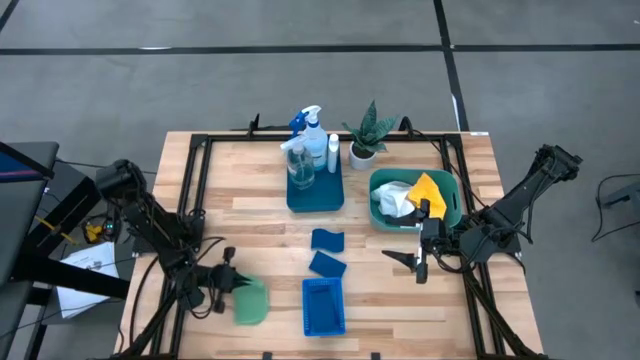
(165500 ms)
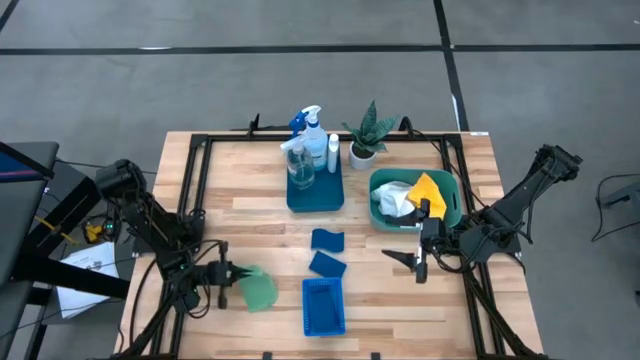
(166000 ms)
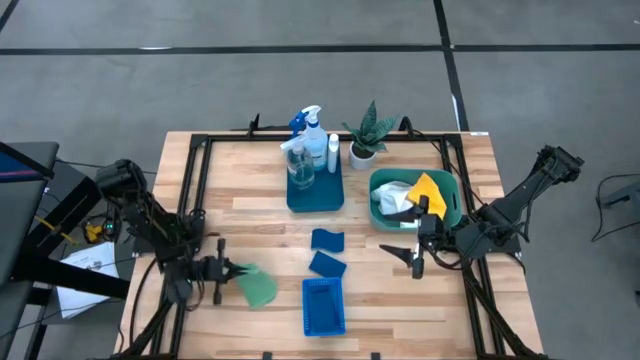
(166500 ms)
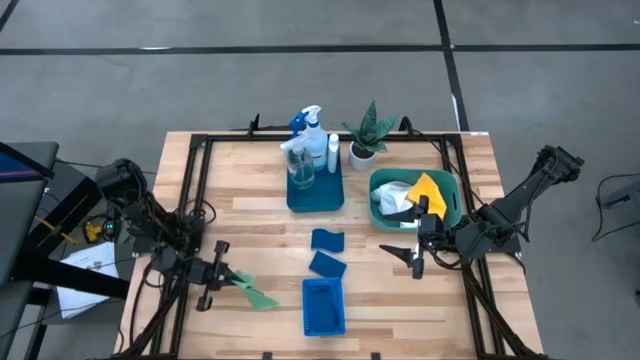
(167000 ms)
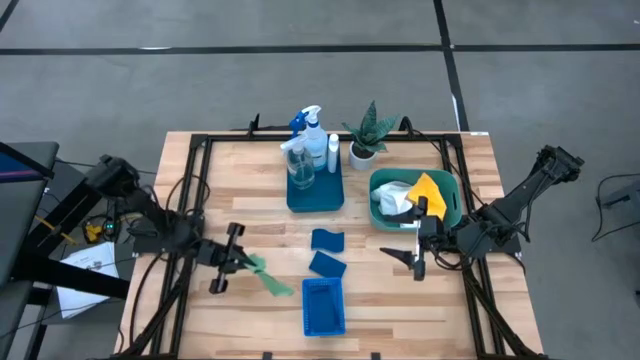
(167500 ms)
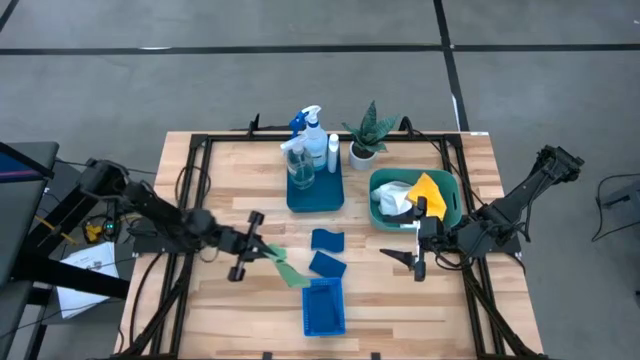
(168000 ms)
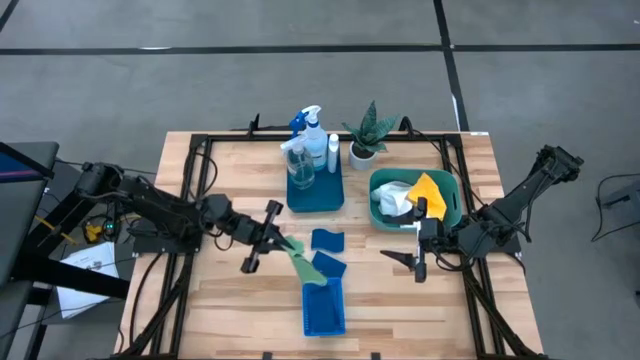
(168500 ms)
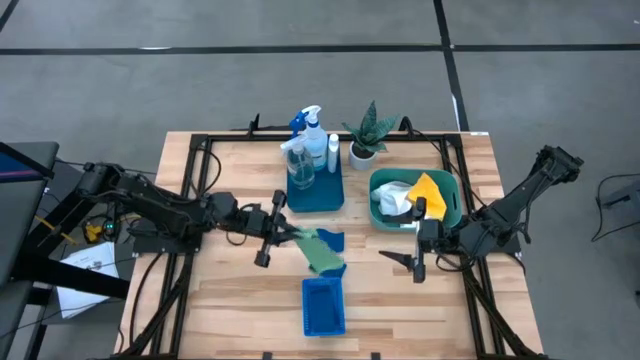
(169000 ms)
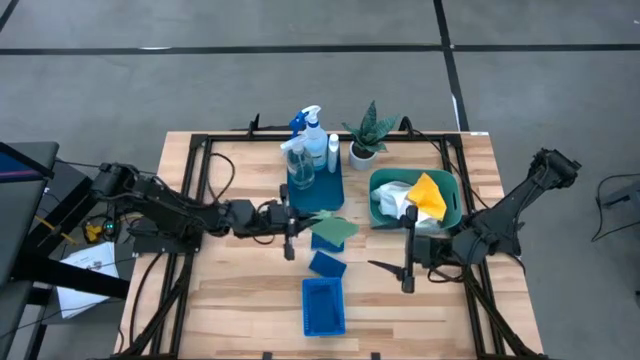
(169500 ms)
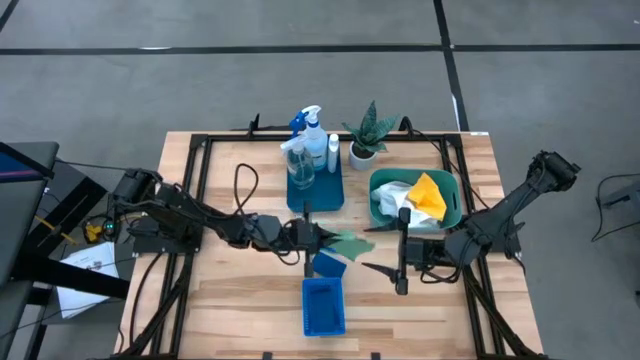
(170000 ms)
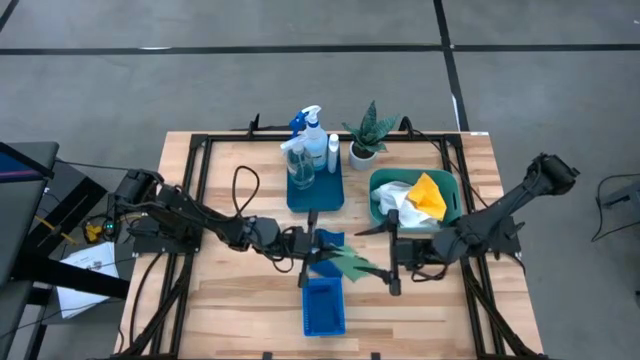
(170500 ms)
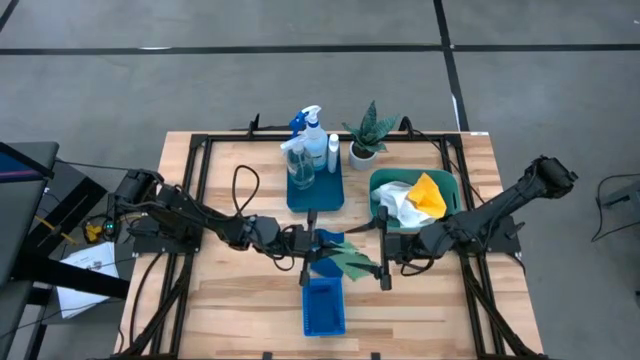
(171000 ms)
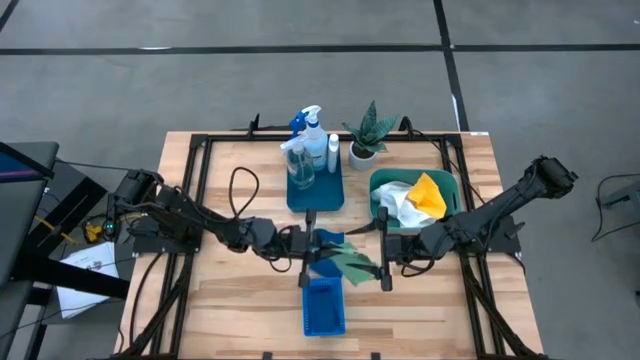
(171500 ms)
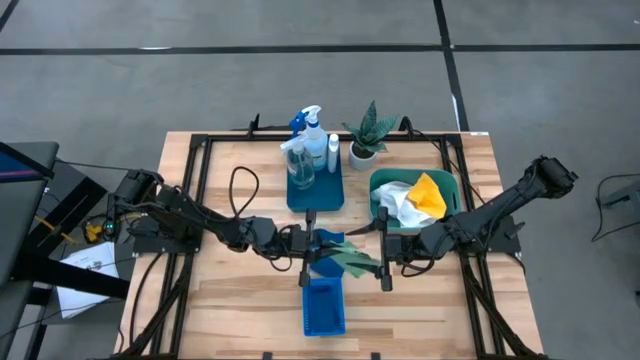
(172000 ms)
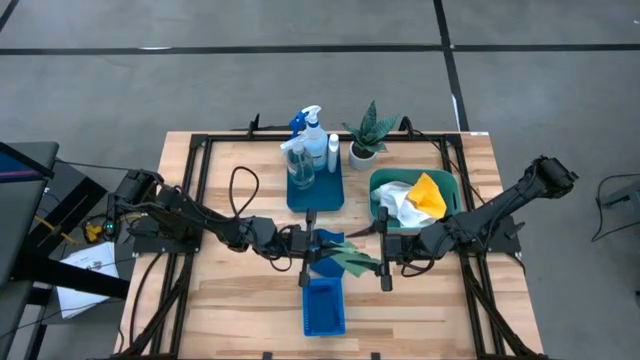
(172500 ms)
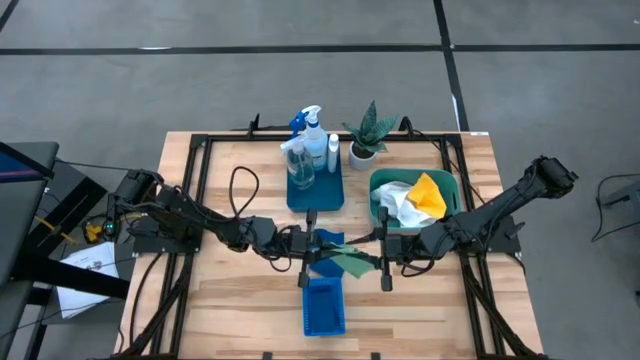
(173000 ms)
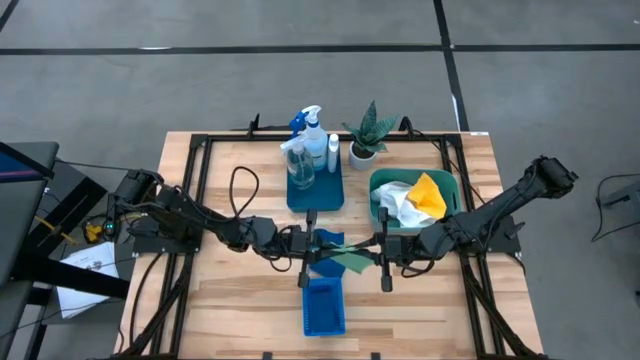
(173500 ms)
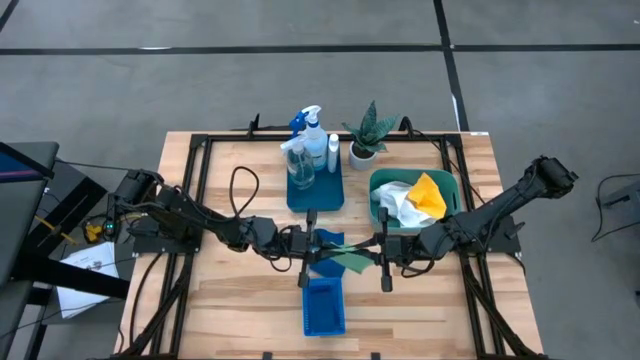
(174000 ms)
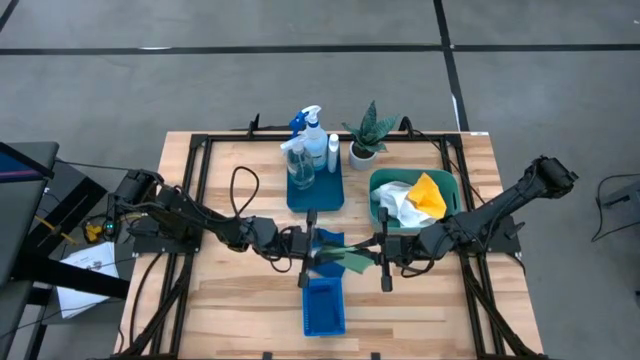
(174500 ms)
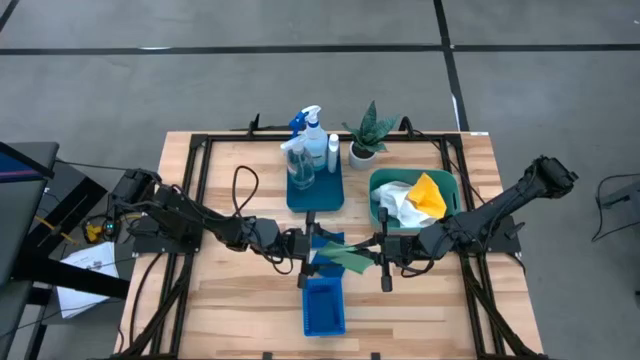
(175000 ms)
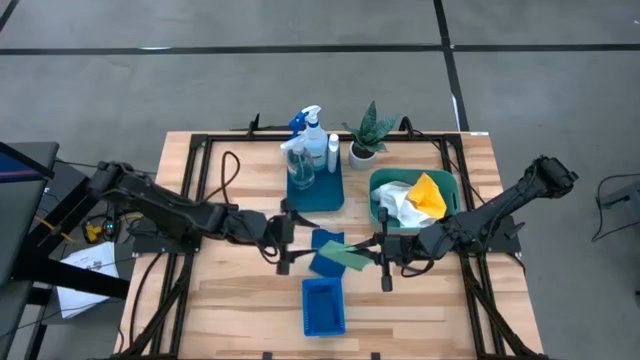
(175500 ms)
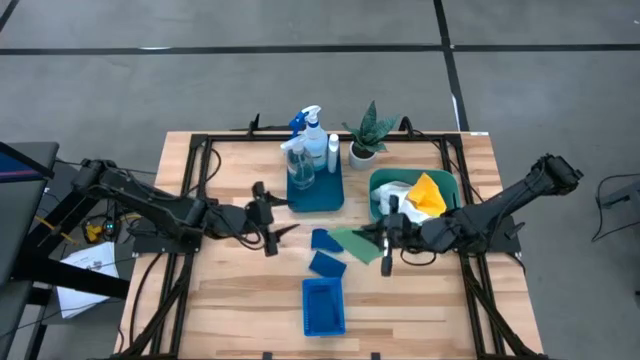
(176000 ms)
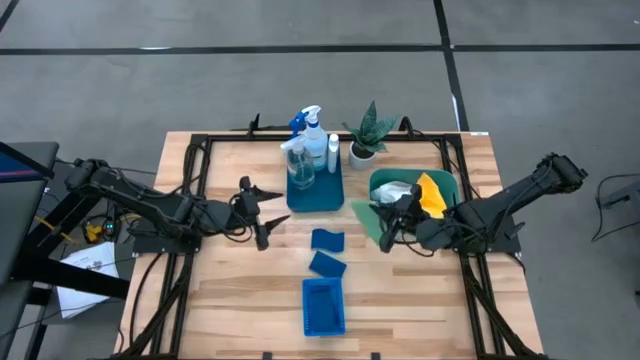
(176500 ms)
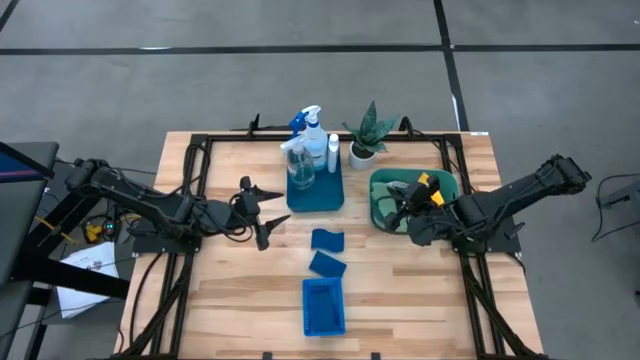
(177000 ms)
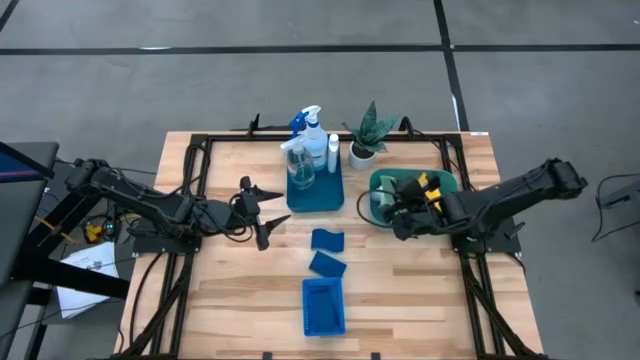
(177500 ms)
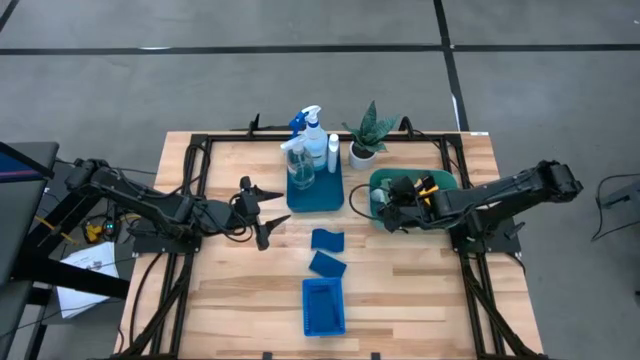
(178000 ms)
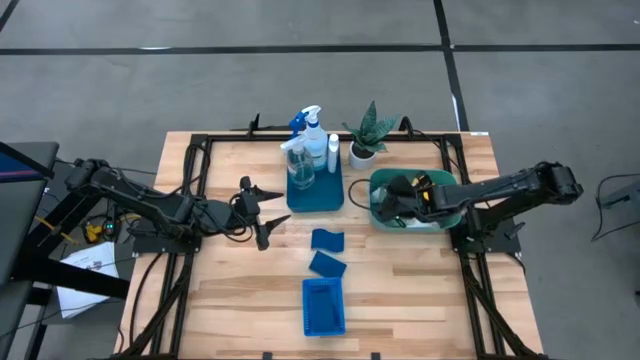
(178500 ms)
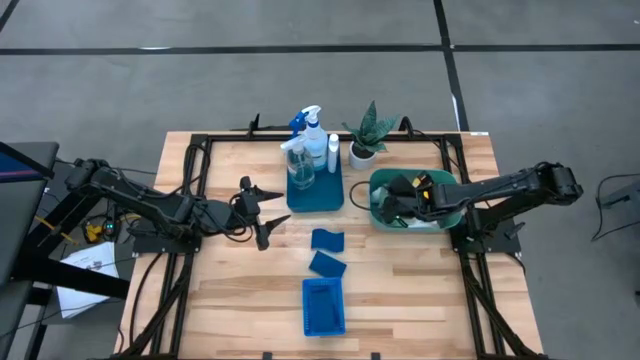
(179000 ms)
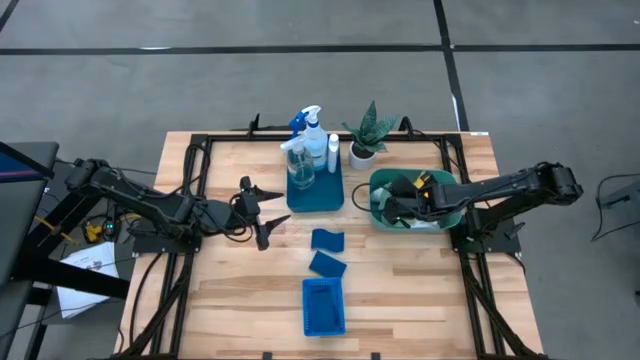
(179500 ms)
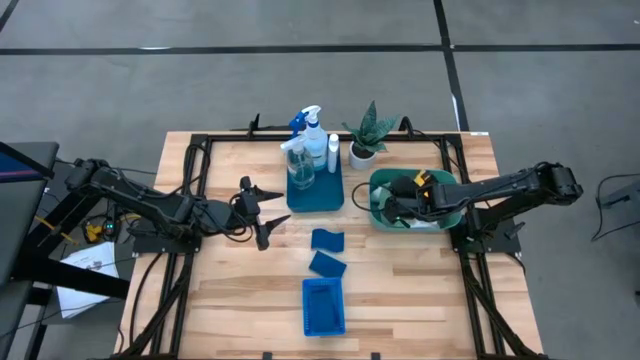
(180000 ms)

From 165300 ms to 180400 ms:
Task: Pick & Place Kitchen Items
Put the green microfiber towel into the green bin

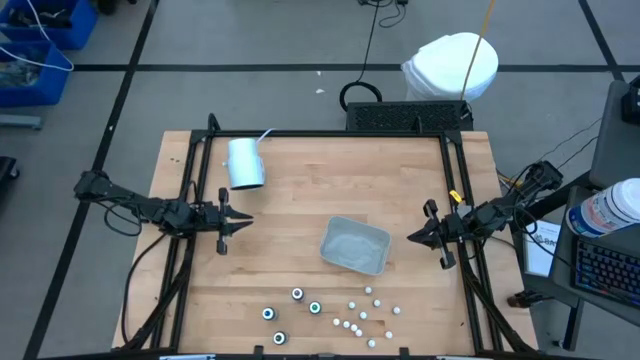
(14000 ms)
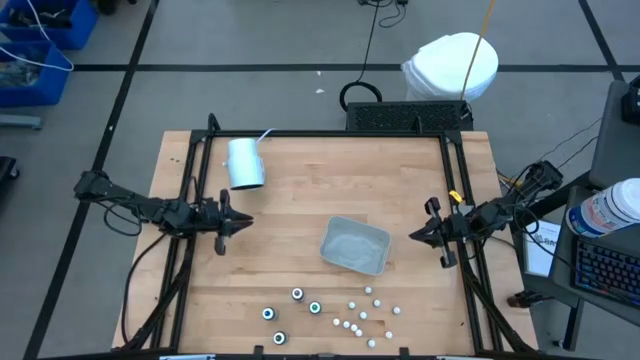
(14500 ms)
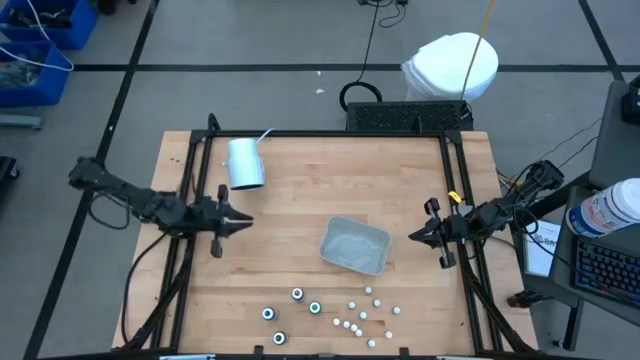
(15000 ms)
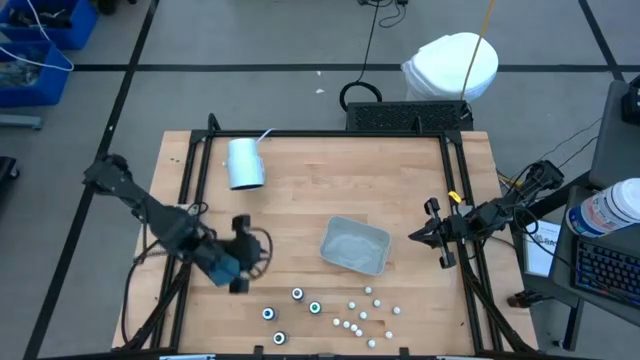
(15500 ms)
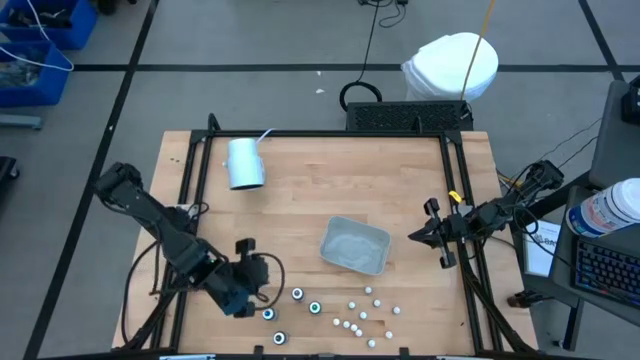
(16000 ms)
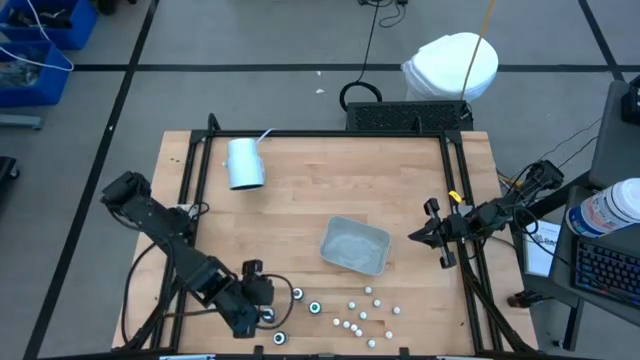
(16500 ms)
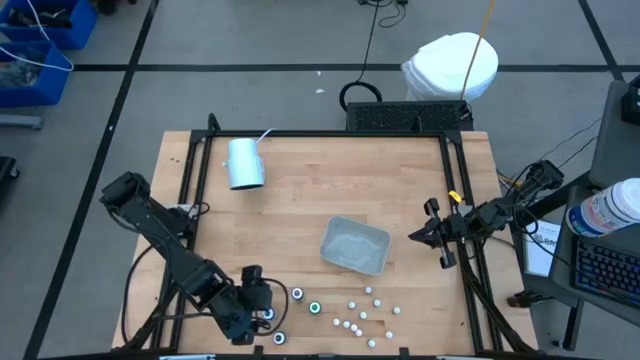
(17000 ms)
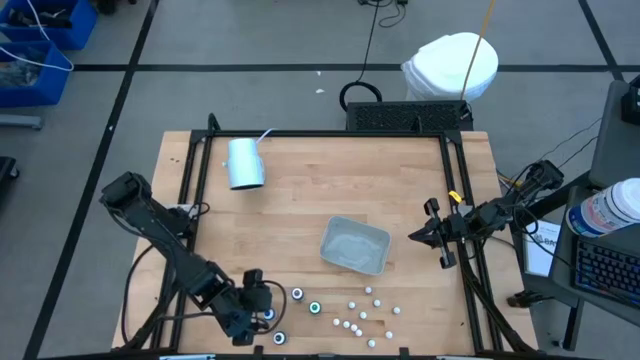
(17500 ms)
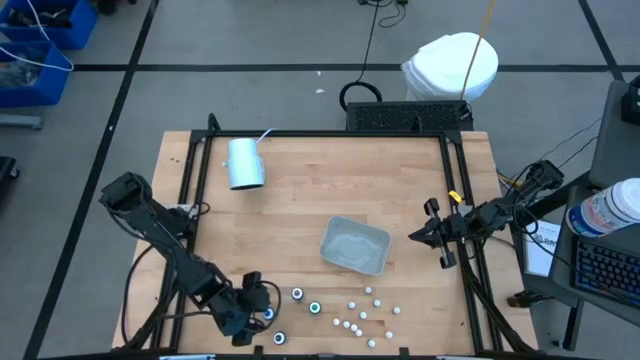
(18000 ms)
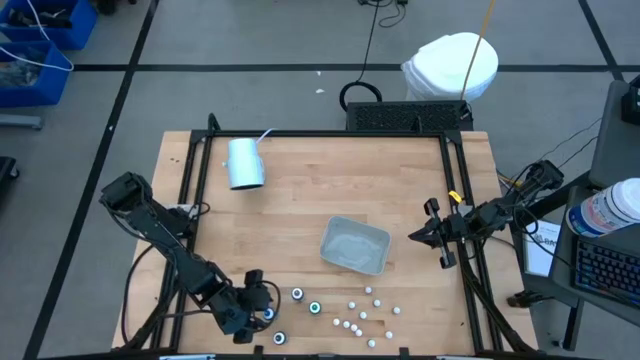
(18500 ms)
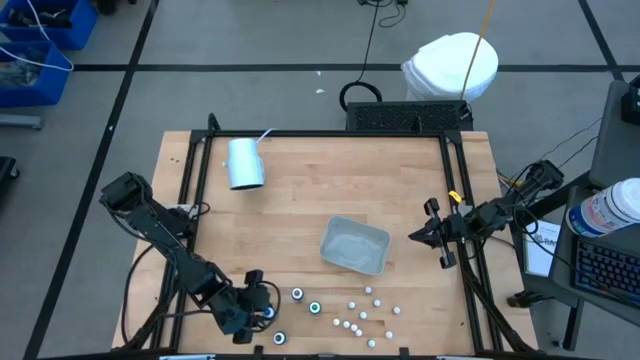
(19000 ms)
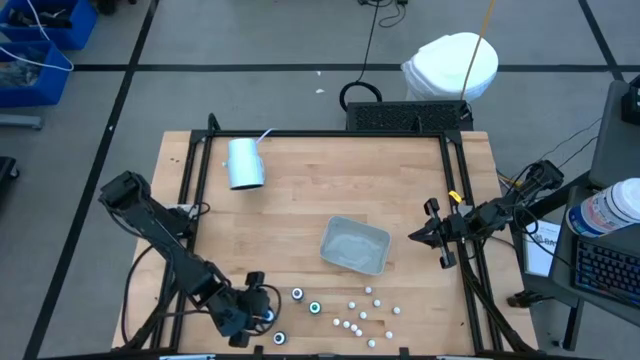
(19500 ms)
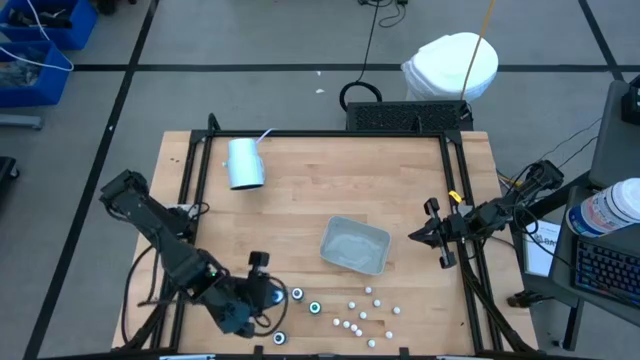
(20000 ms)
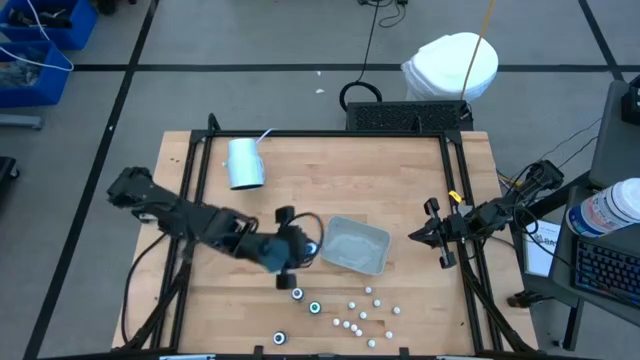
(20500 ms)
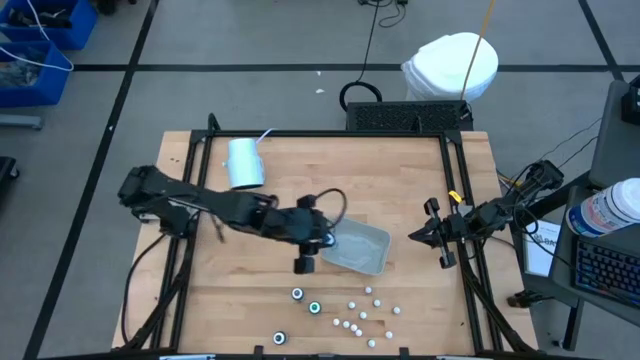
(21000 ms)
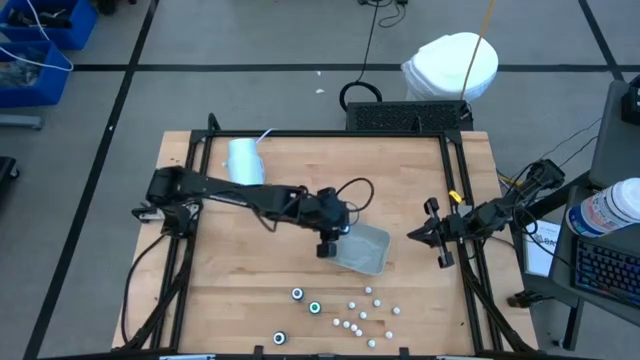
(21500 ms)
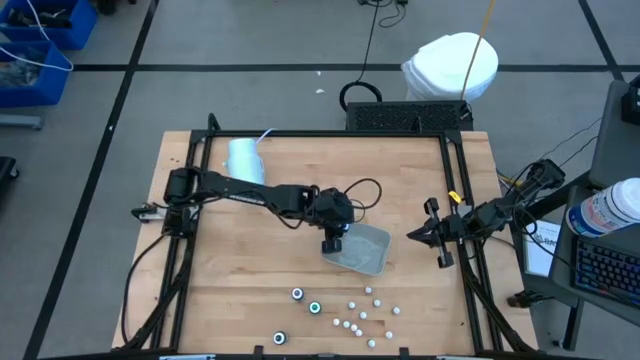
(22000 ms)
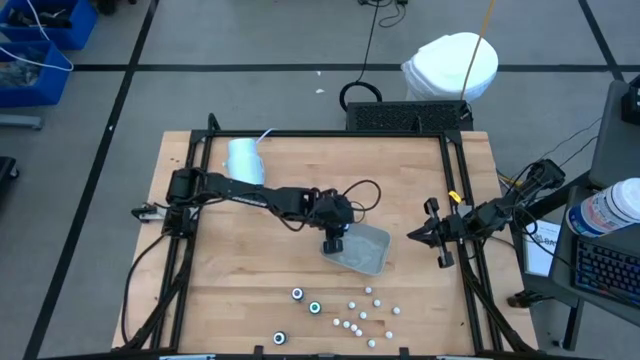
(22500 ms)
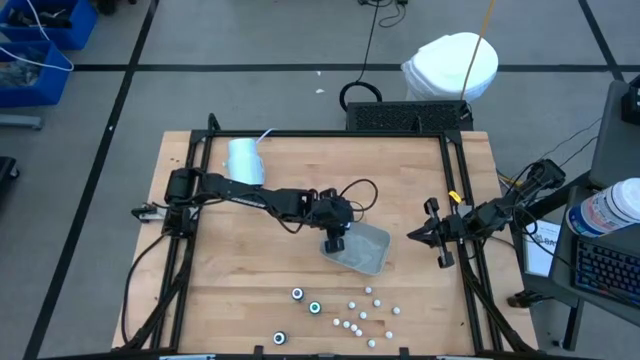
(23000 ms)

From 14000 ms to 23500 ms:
Task: Pick & Place food coloring
Put the large blue food coloring bottle into the gray bin
